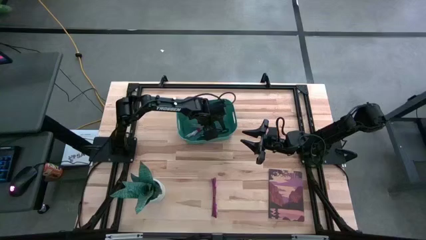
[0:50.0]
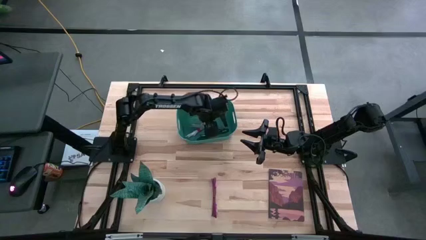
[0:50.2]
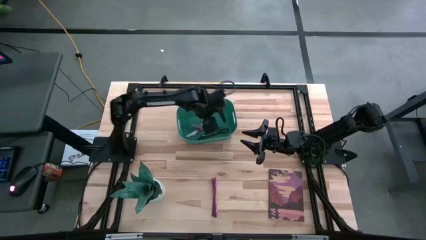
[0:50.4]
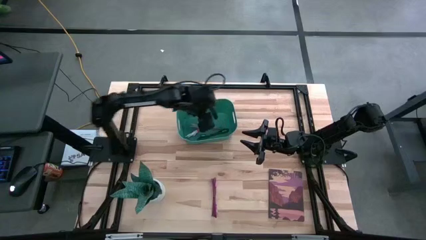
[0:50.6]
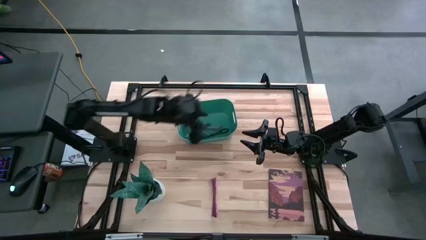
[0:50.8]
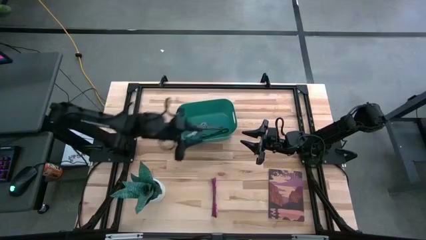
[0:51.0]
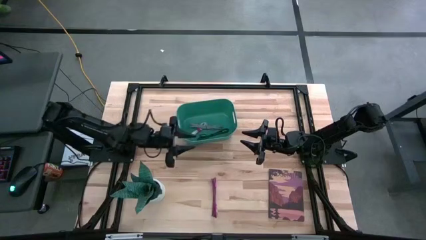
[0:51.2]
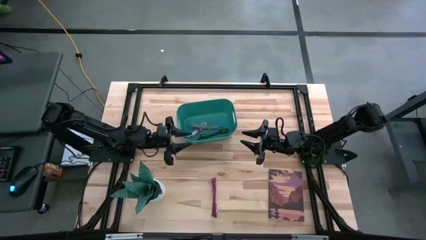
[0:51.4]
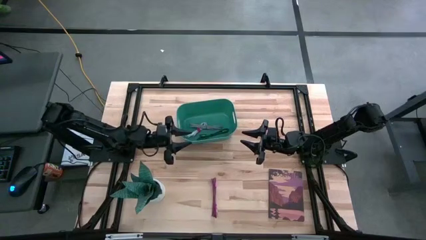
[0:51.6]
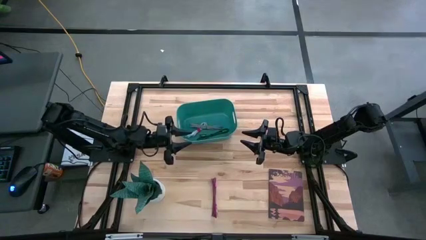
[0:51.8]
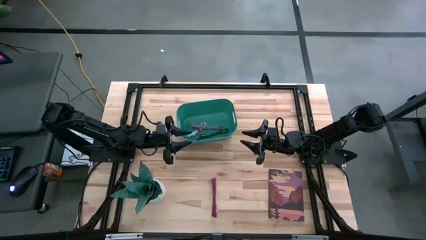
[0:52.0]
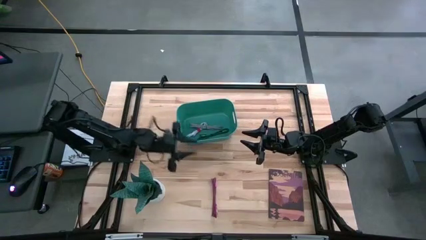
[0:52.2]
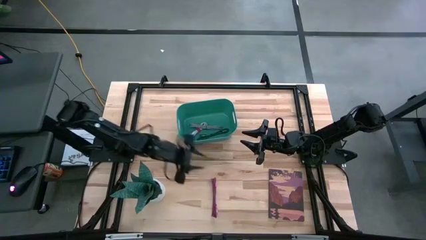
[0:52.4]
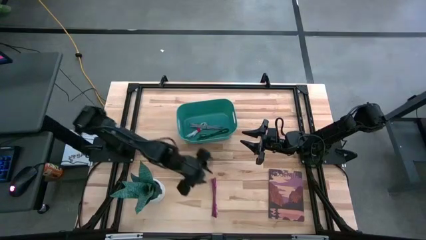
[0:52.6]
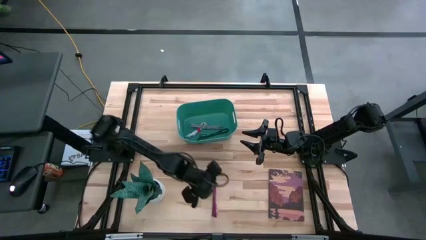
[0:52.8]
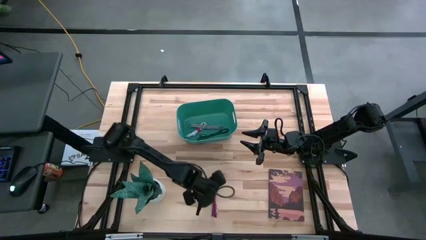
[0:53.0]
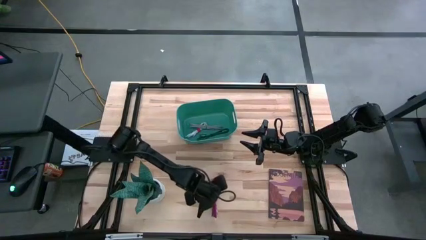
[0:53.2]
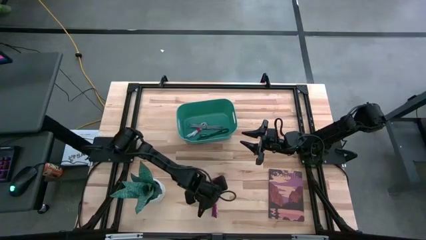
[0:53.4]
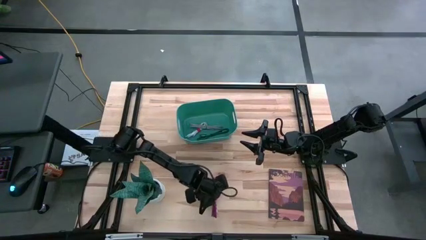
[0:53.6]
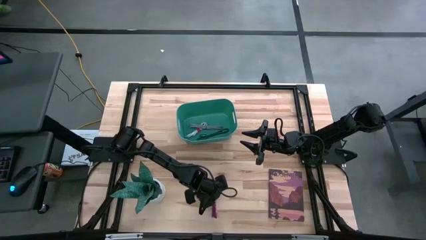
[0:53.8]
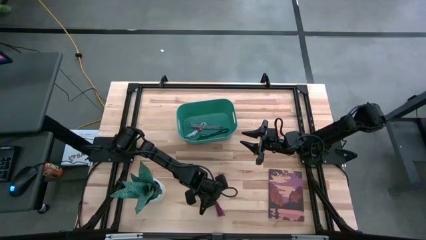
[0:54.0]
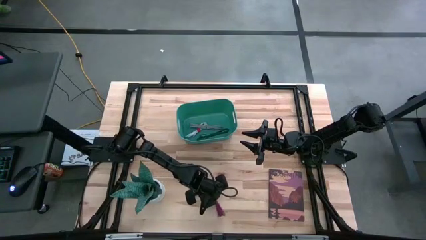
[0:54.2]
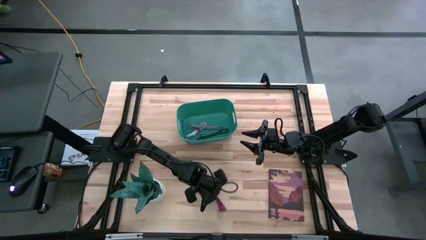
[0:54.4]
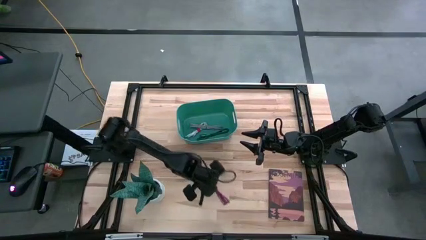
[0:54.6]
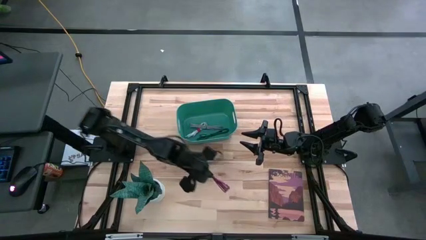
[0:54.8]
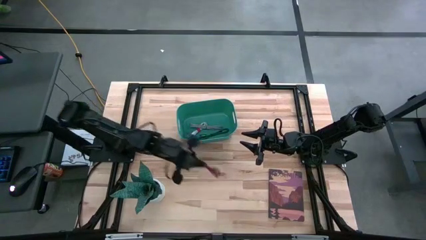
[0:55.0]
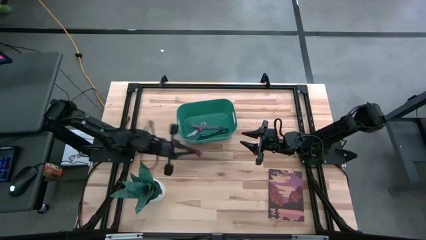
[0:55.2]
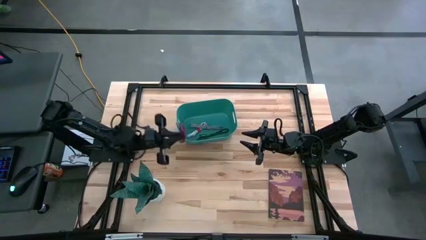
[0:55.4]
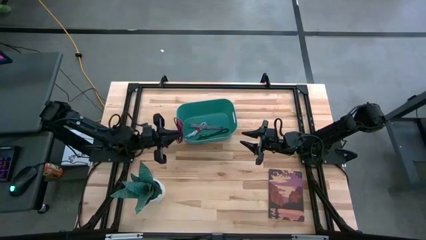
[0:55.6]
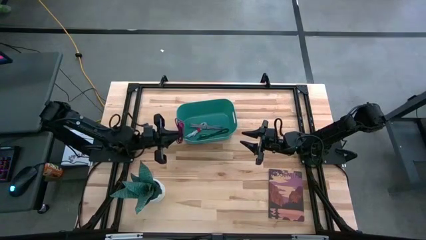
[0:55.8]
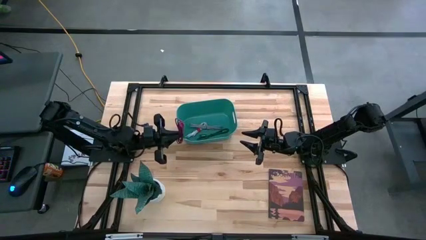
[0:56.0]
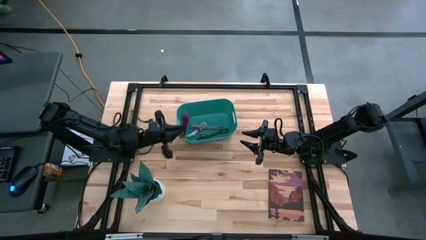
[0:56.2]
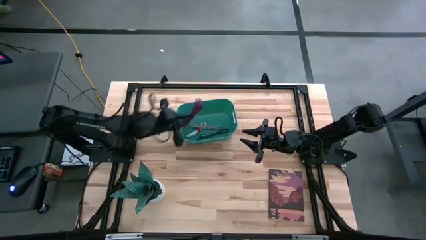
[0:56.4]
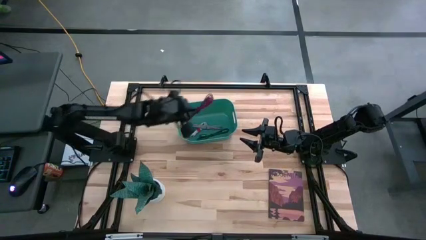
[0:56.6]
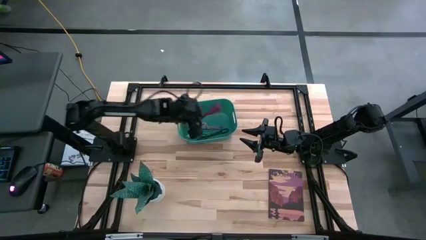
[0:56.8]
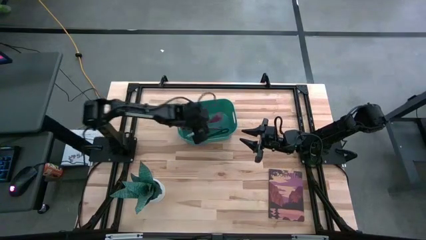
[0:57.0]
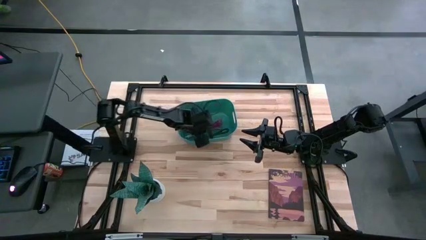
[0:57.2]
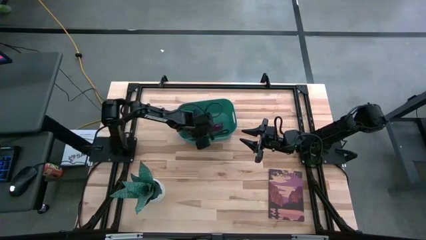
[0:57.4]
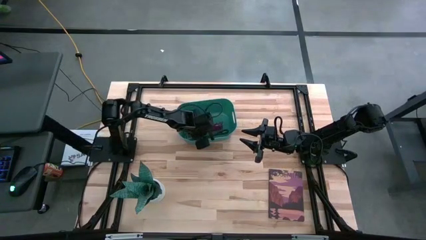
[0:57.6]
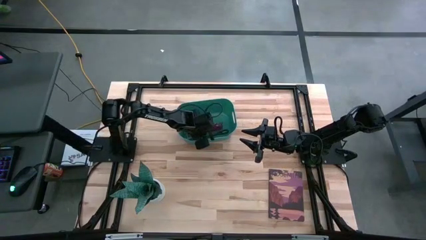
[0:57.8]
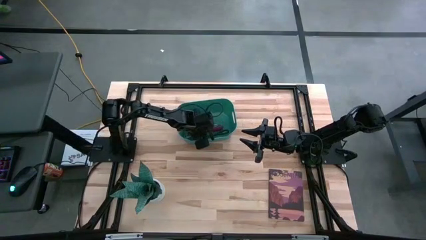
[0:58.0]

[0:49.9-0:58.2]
Task: Pick and place USB-C Cables
Put the red charger cable into the green bin

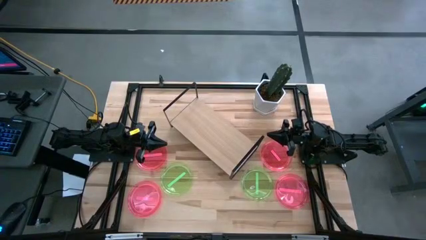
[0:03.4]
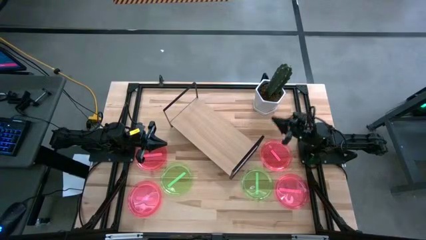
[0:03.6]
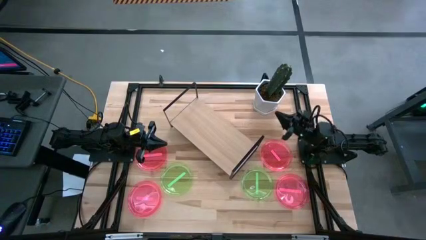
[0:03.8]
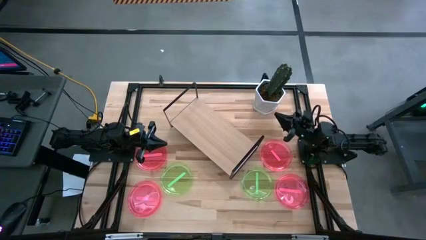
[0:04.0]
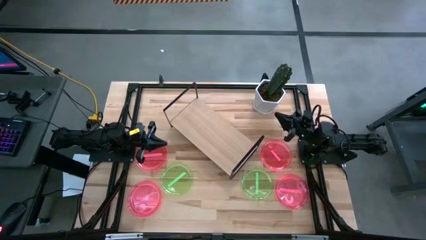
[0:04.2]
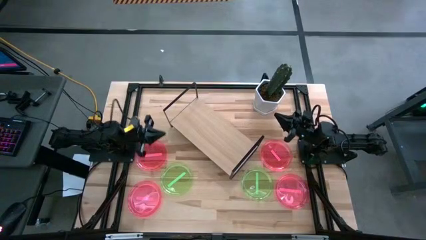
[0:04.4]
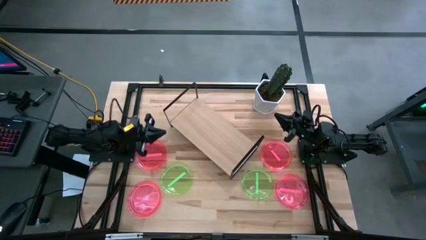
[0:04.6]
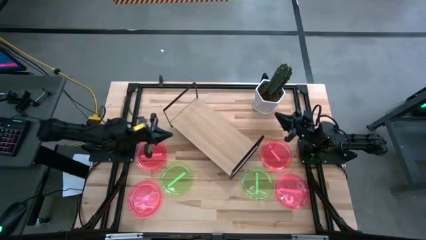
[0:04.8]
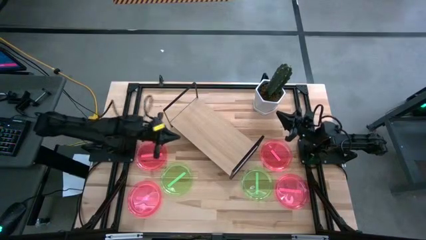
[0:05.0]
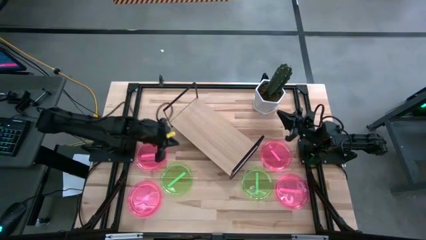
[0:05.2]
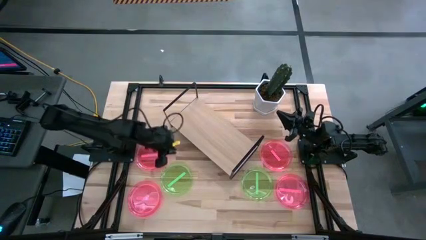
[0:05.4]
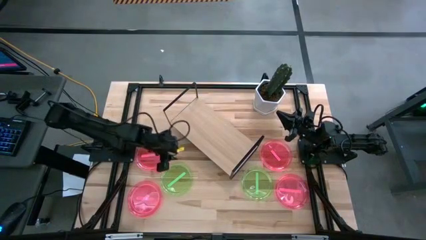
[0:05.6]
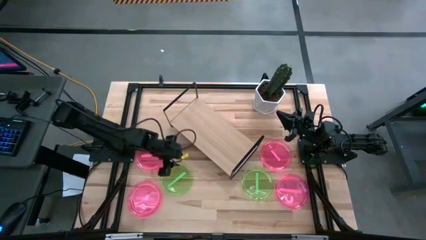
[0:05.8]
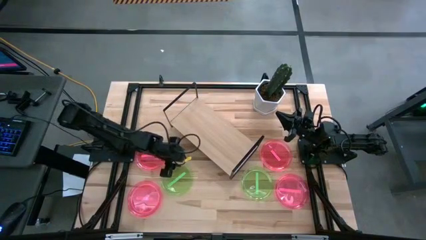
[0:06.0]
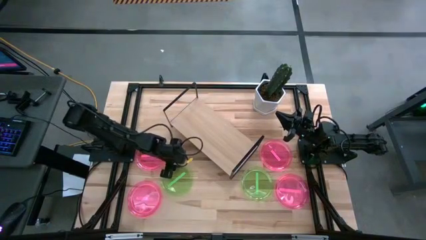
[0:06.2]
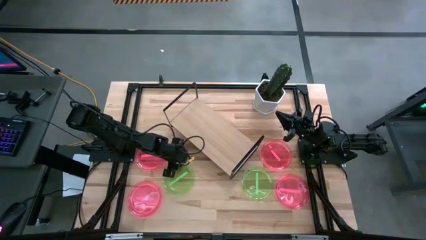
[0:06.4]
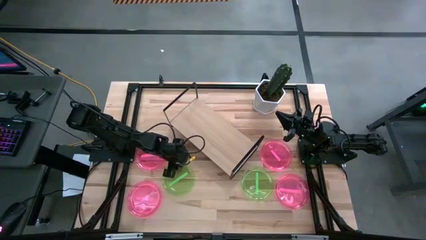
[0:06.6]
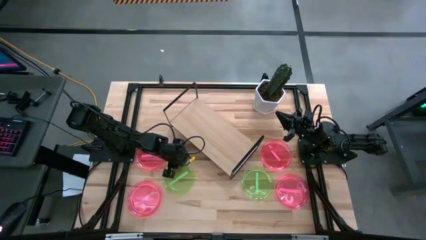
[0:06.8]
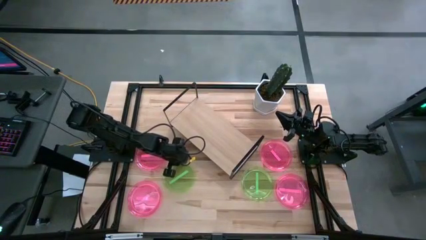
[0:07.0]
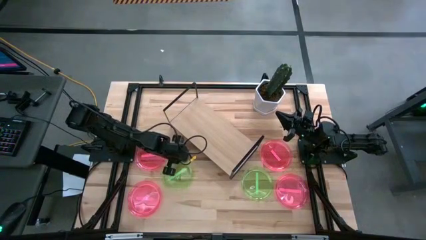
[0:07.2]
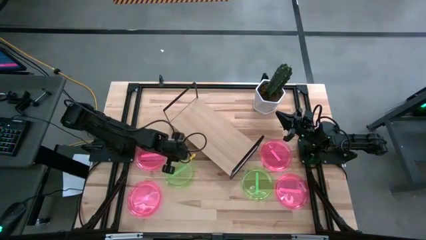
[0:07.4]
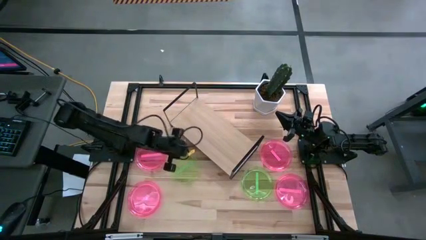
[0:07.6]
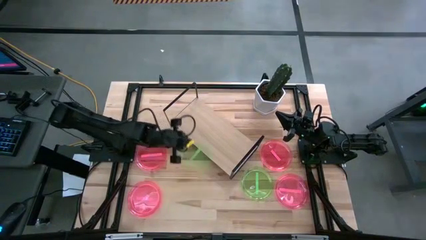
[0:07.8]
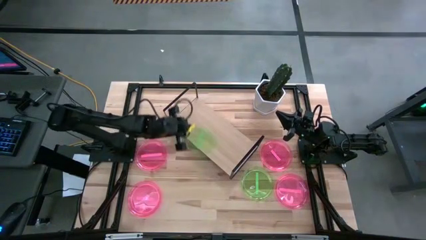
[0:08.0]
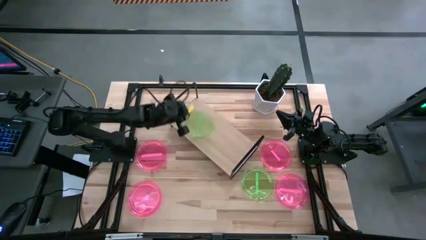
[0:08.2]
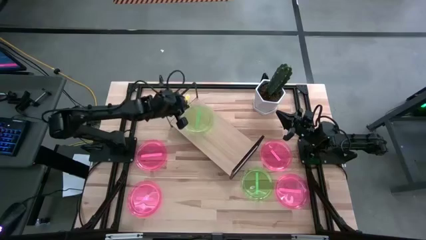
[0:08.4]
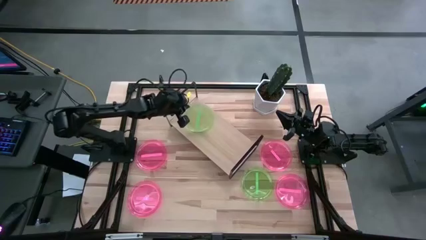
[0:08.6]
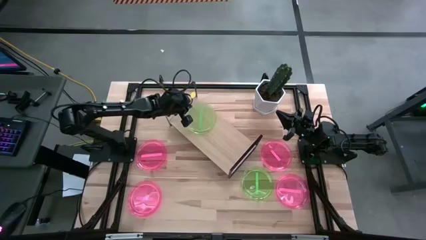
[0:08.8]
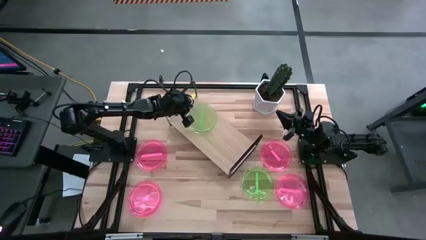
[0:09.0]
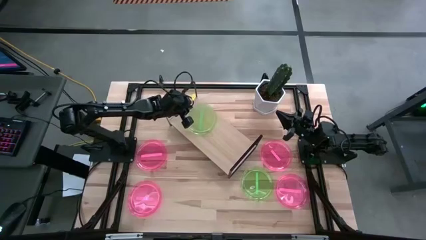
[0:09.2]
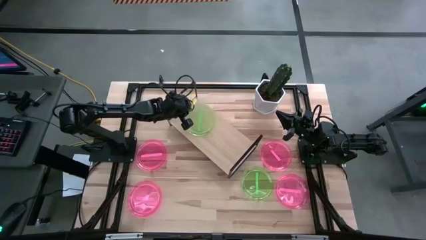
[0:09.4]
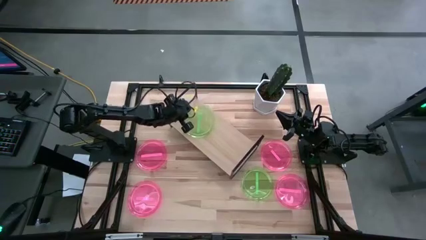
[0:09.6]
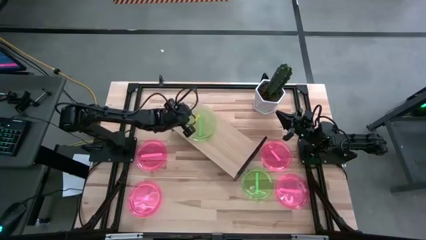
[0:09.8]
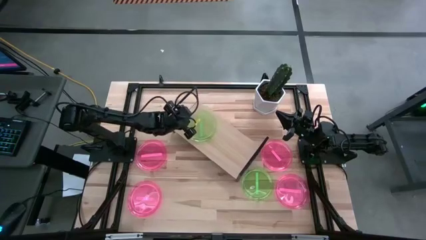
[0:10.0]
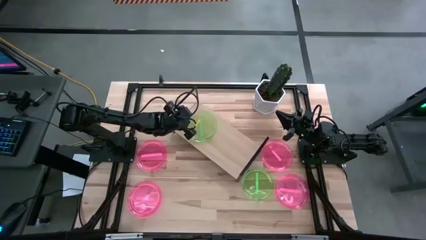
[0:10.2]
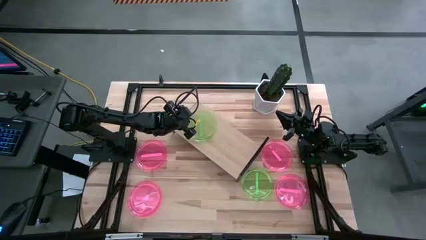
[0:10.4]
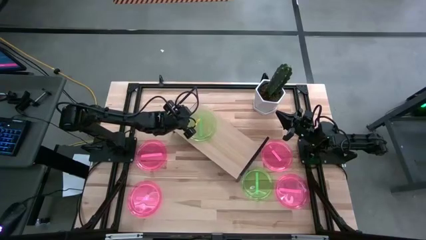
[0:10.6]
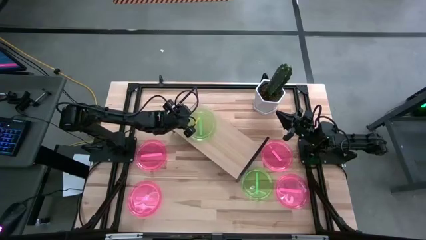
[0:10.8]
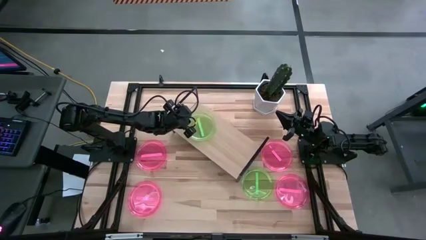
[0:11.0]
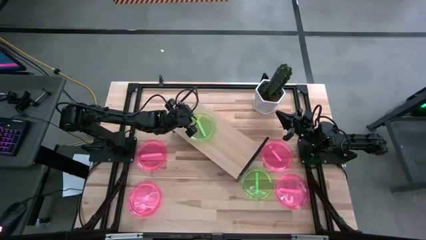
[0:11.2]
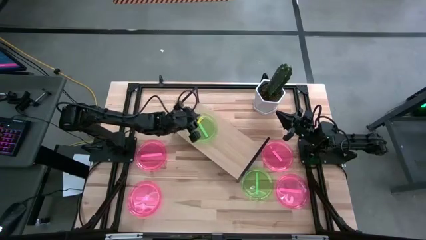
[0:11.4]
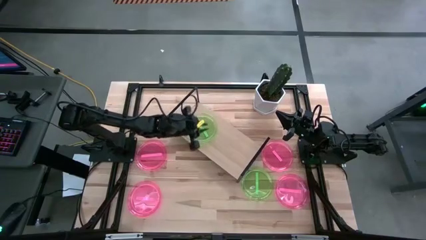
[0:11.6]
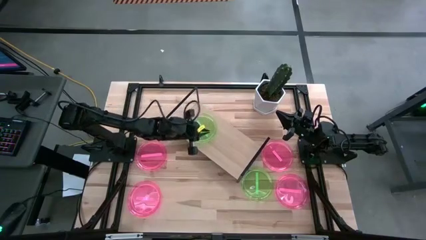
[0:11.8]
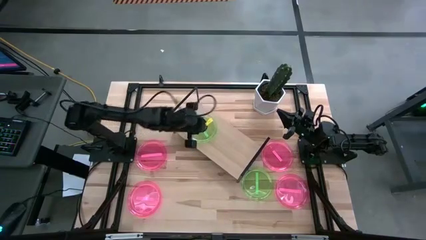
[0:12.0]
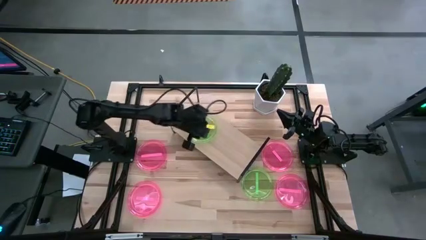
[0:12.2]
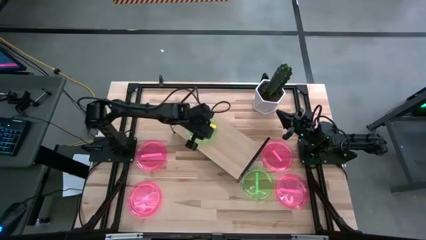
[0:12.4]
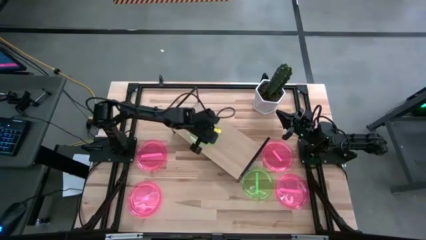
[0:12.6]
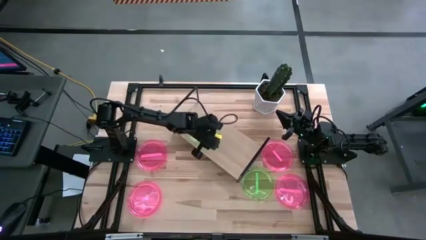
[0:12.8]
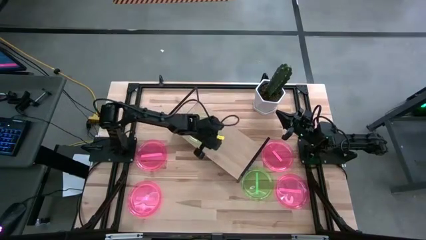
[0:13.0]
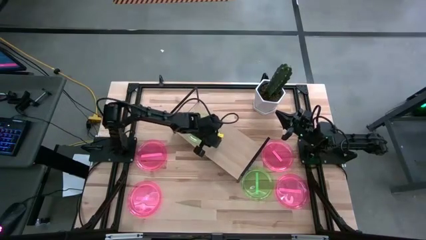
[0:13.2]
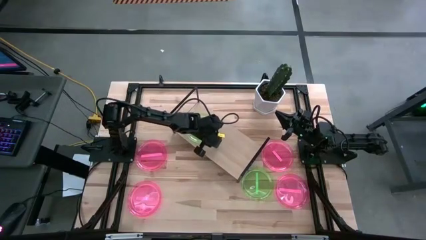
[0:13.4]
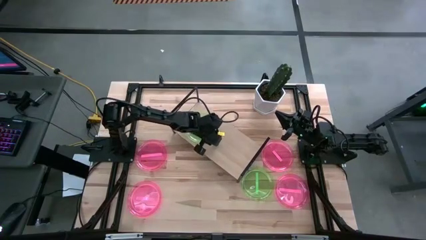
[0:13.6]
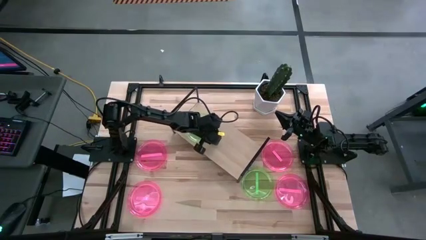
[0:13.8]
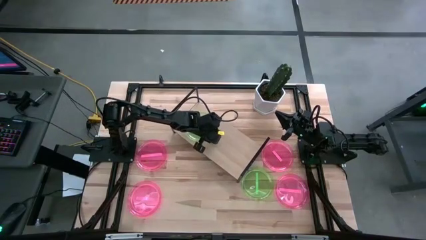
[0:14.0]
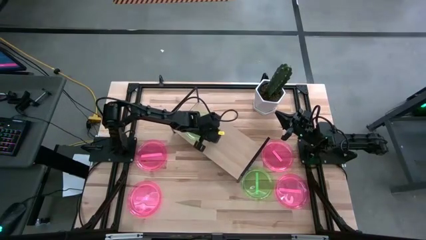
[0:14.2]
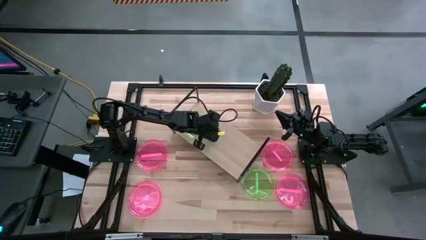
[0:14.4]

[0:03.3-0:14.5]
Task: Place and stack plates onto a shelf
Put the green plate on the shelf
